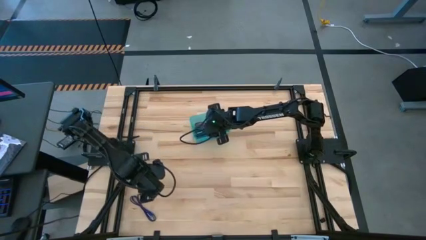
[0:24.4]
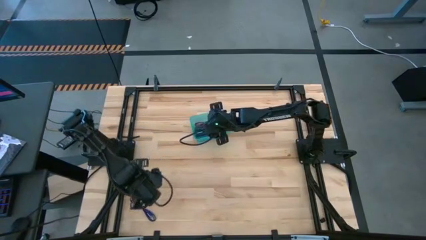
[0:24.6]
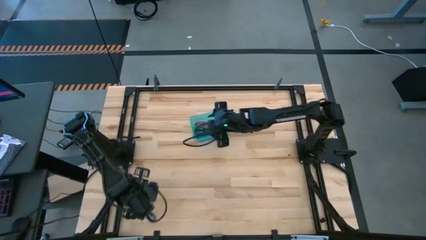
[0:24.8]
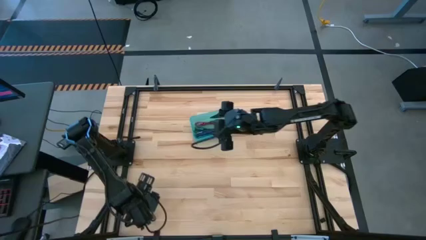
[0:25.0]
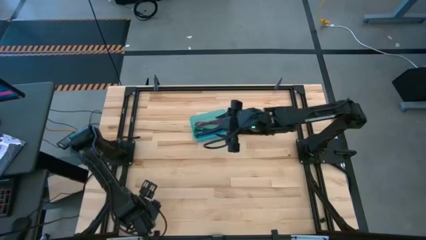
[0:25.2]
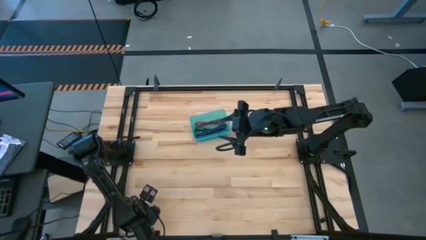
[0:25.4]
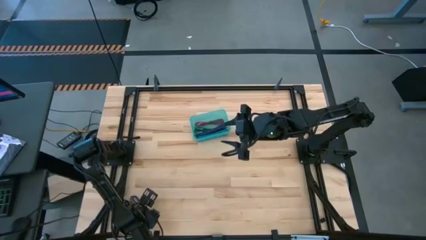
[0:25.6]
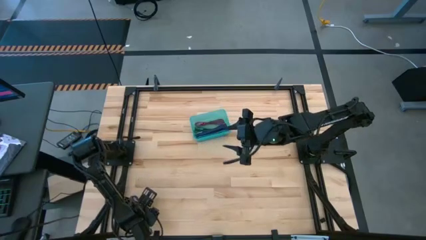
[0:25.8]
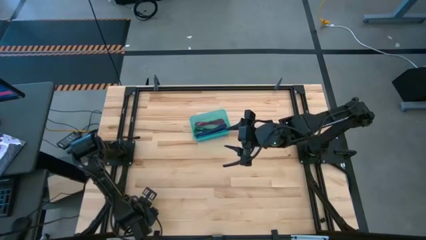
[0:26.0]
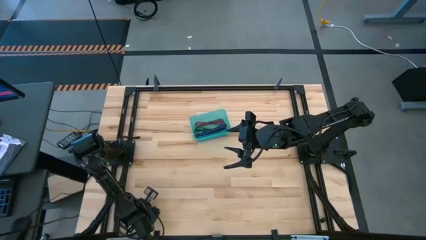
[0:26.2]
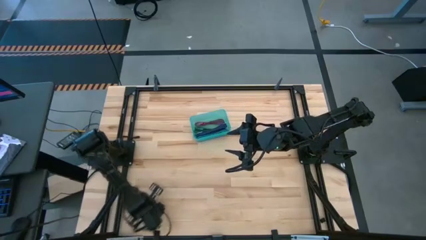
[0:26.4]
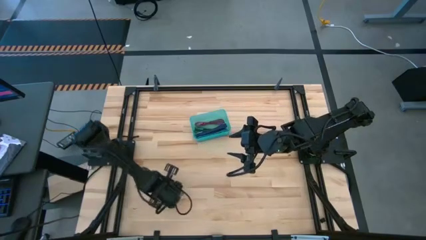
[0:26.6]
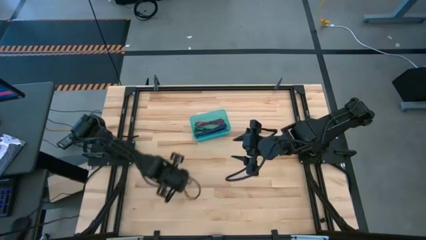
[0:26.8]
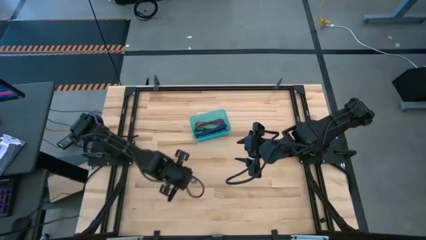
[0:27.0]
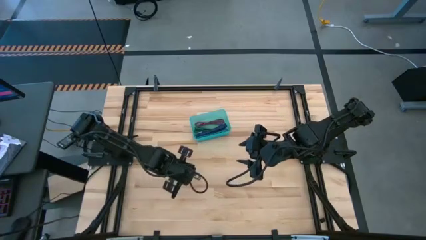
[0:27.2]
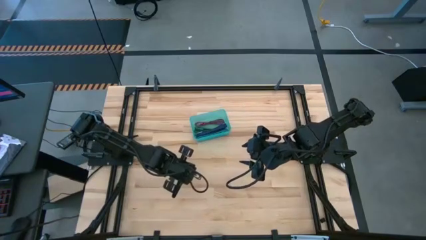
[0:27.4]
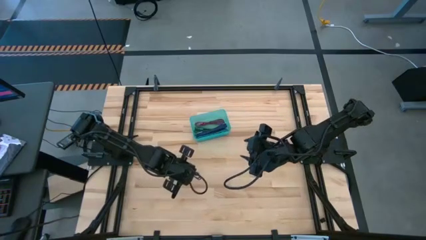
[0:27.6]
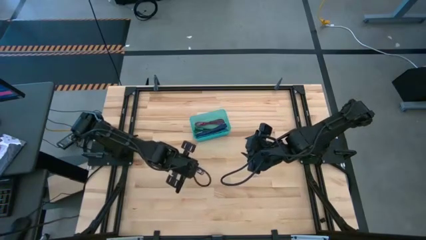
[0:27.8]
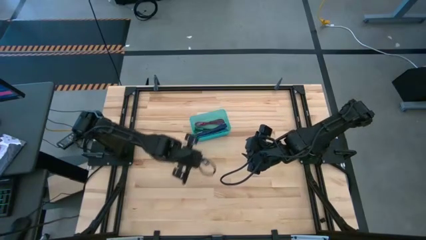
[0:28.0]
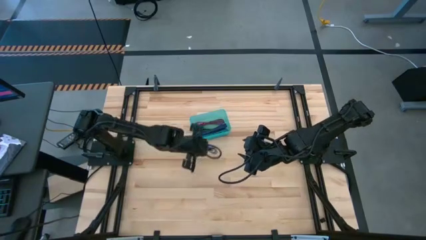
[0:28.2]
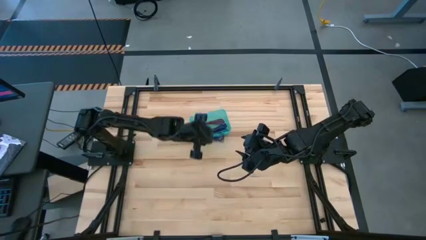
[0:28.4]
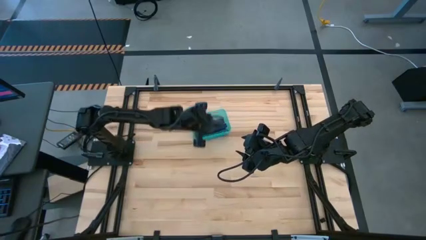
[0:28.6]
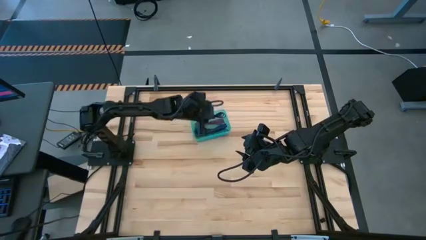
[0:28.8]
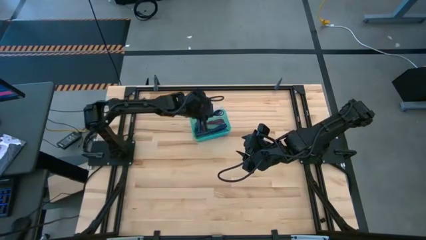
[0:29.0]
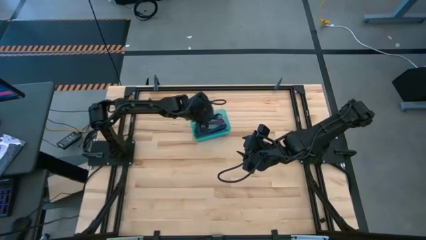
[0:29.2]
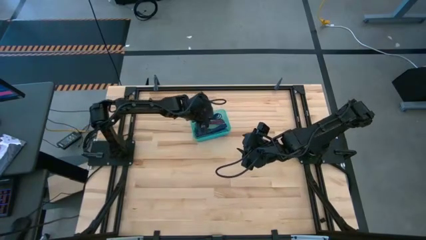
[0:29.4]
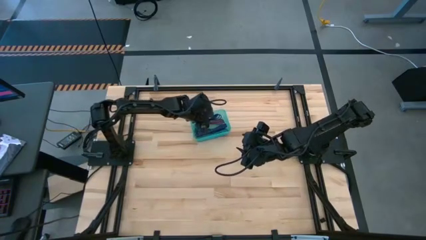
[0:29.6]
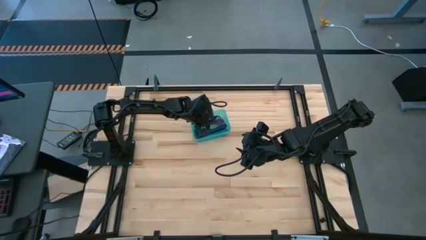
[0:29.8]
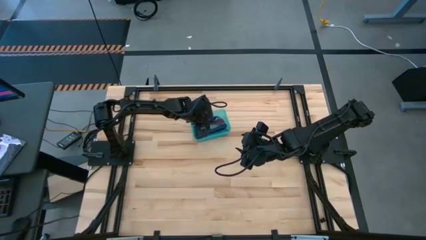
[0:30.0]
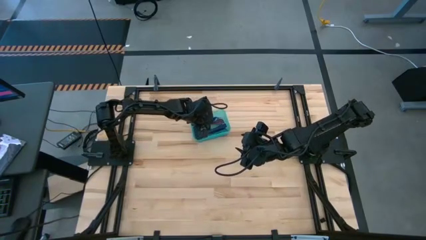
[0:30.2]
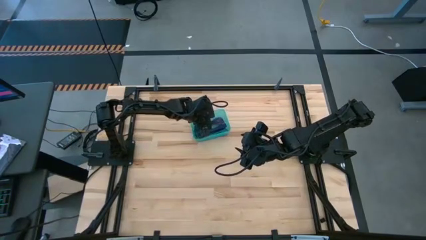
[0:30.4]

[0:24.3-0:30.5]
Task: Pick and place USB-C Cables
Put the purple charger cable into the green bin

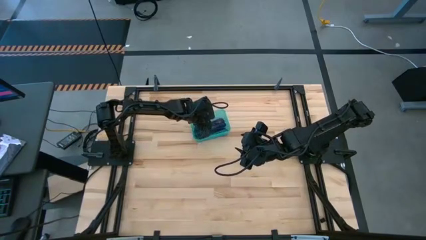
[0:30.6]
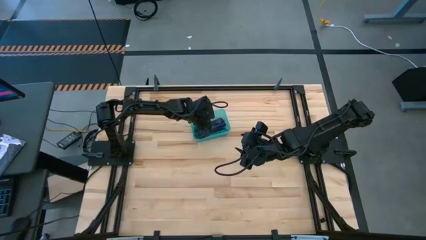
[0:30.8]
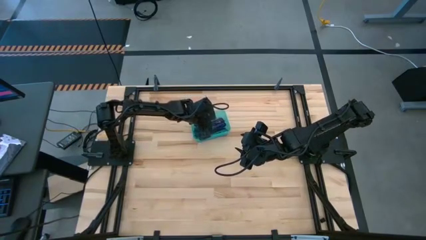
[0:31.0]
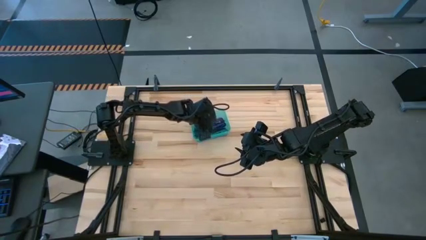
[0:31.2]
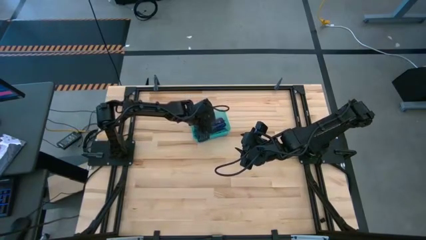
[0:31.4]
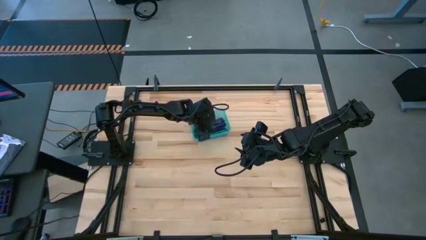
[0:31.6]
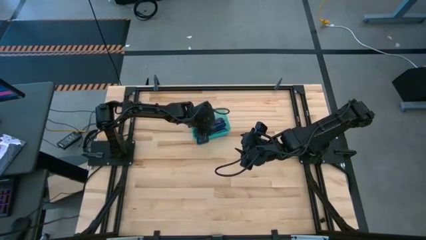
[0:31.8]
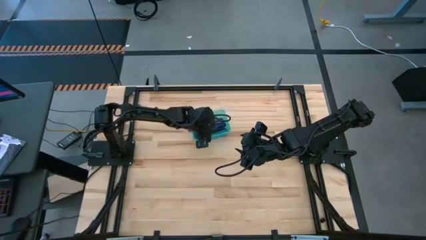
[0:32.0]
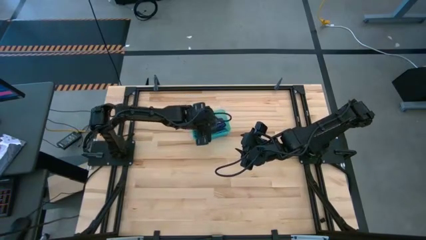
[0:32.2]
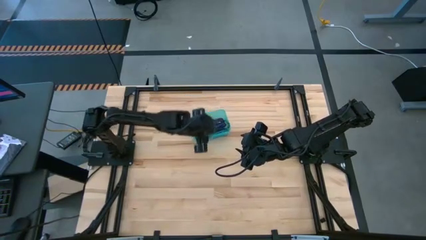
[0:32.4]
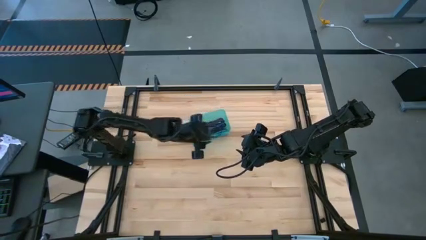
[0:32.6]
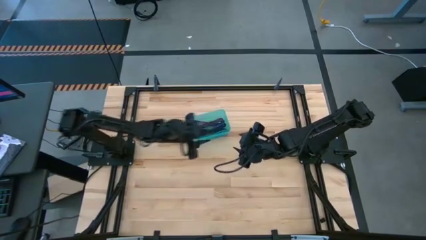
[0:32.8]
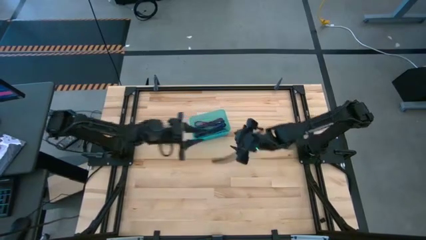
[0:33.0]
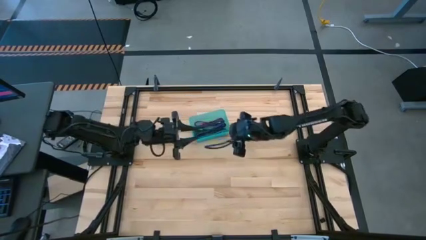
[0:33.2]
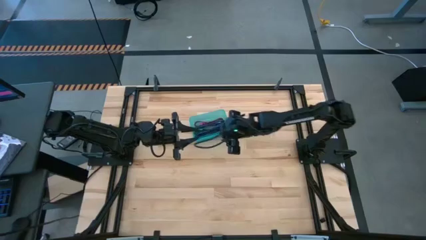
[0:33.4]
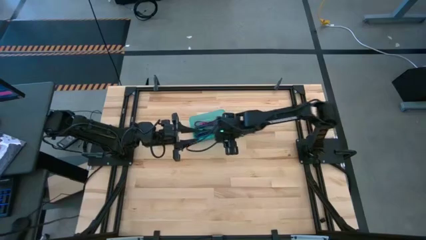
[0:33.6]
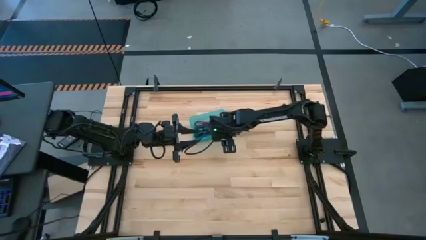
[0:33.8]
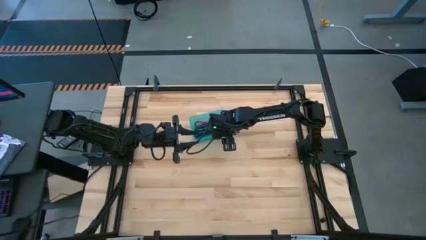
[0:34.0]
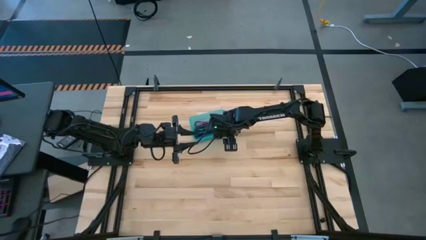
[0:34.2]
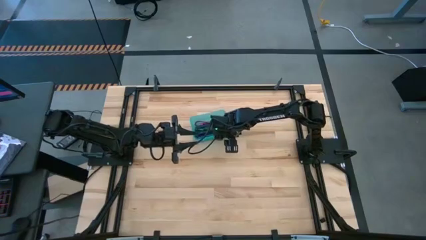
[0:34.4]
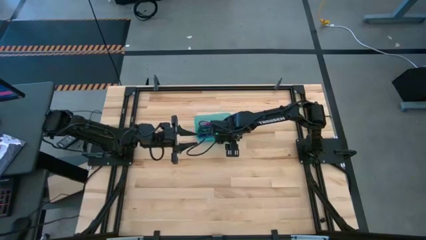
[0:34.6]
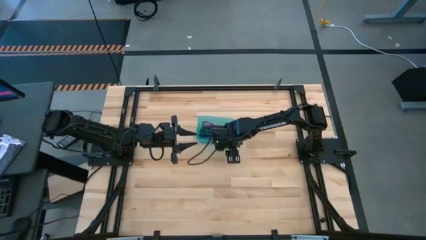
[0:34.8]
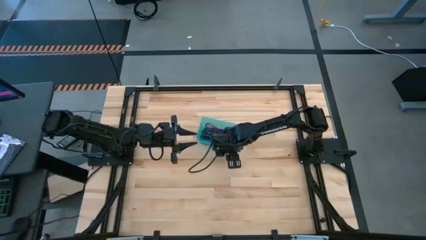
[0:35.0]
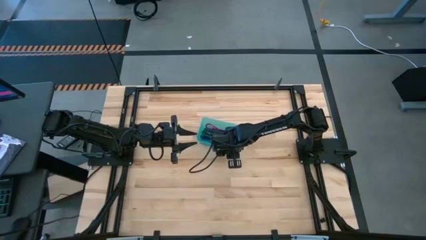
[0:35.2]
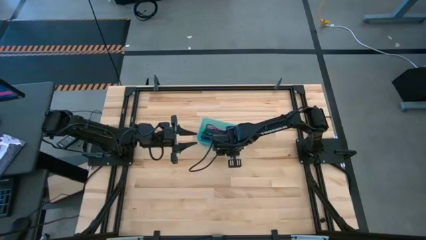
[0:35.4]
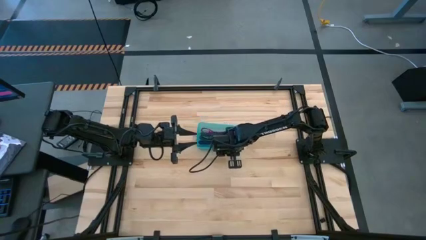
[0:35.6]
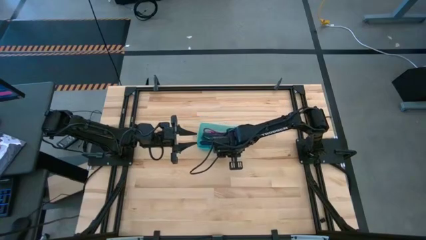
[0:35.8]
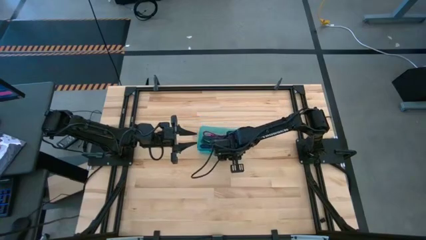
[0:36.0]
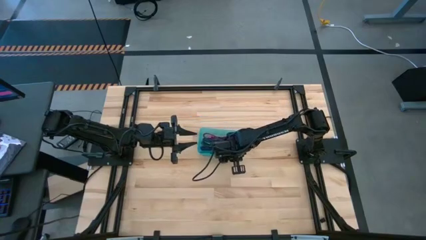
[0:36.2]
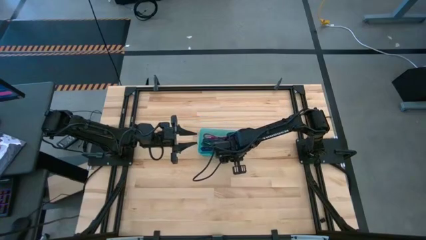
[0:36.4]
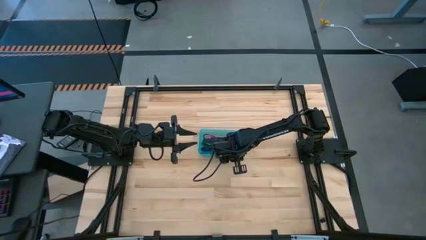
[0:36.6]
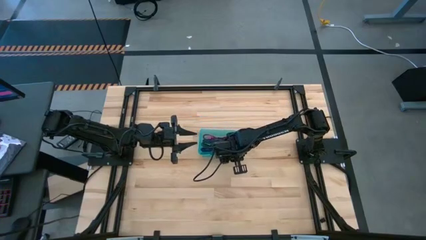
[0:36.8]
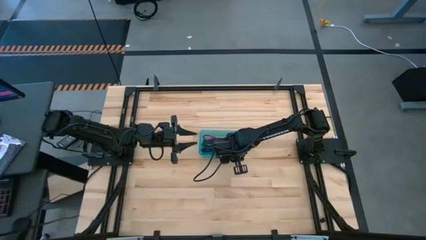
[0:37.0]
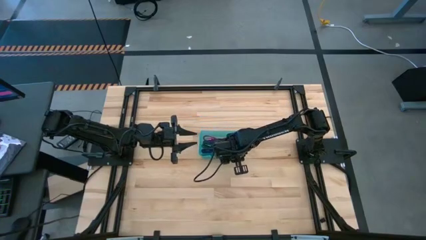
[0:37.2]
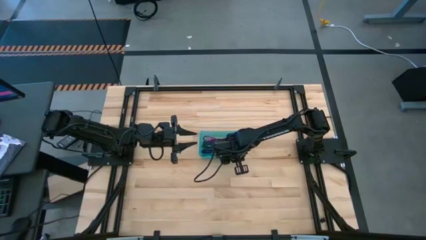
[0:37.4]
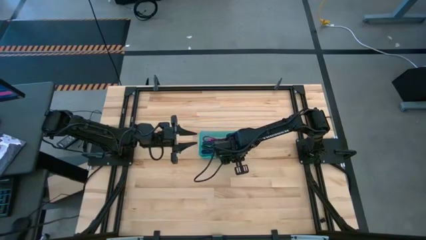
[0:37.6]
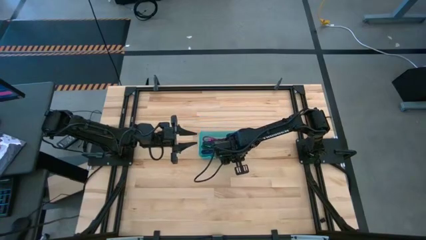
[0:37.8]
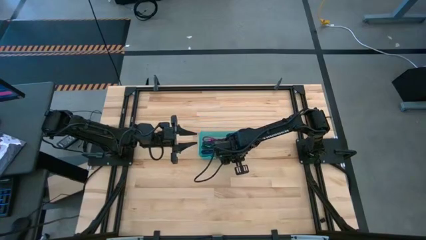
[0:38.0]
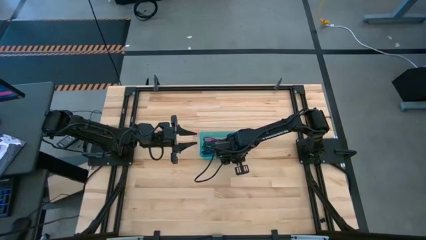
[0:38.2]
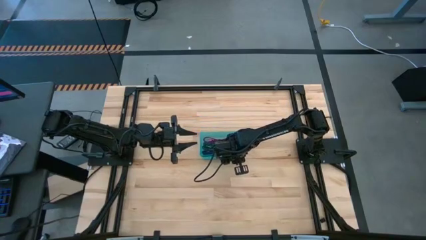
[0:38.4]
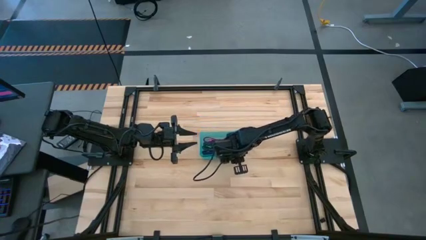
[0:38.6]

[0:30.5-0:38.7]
Adjust the green bin to the middle of the table

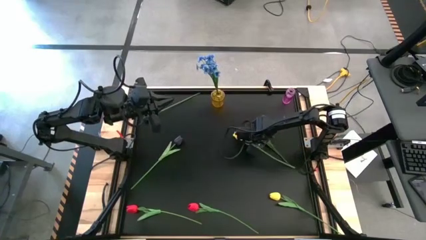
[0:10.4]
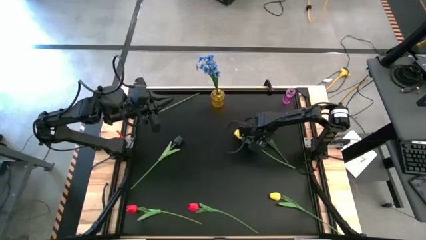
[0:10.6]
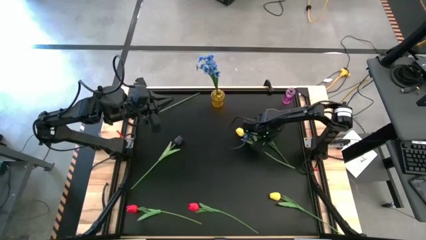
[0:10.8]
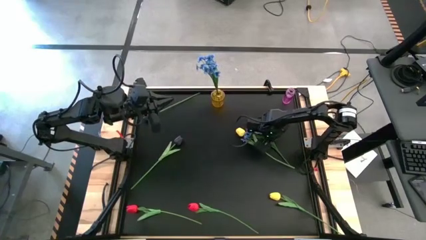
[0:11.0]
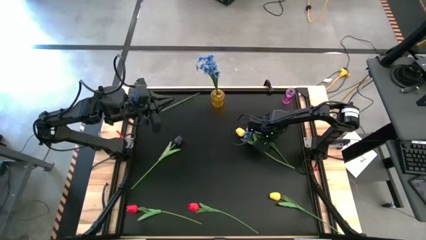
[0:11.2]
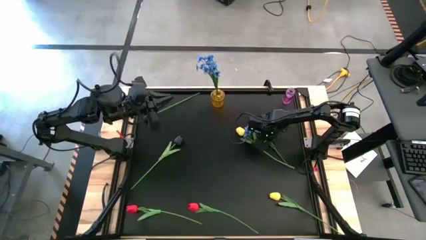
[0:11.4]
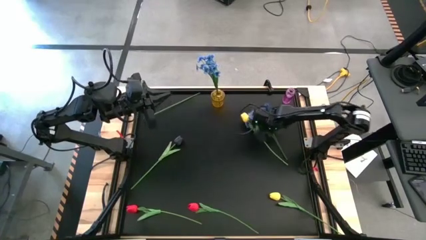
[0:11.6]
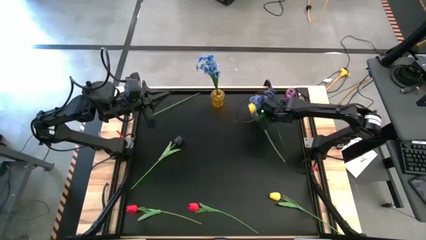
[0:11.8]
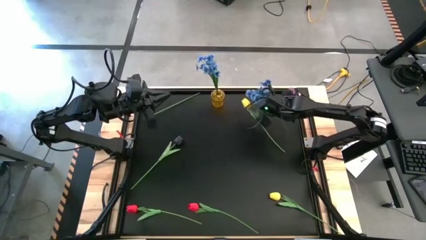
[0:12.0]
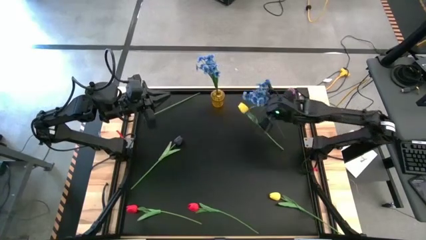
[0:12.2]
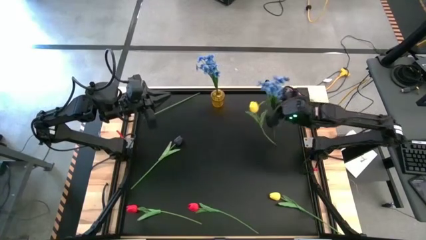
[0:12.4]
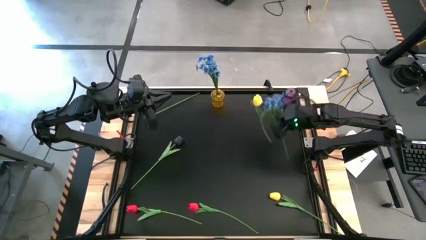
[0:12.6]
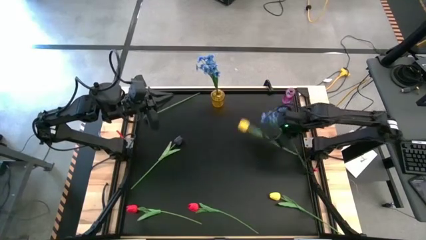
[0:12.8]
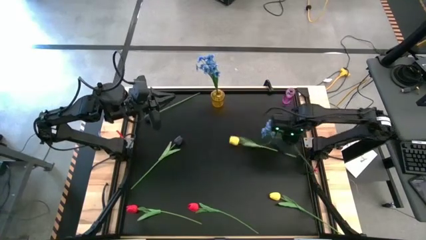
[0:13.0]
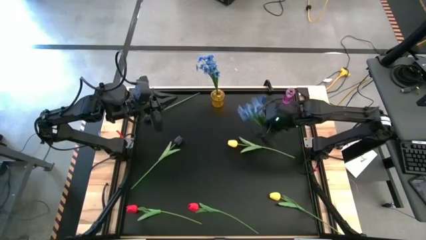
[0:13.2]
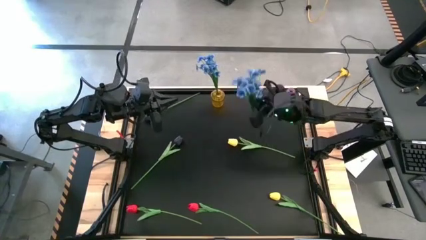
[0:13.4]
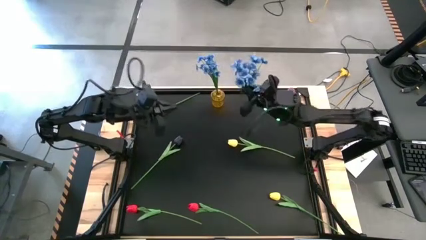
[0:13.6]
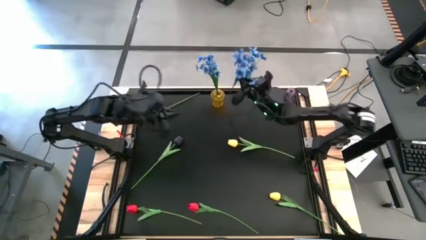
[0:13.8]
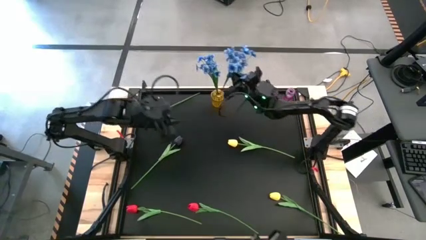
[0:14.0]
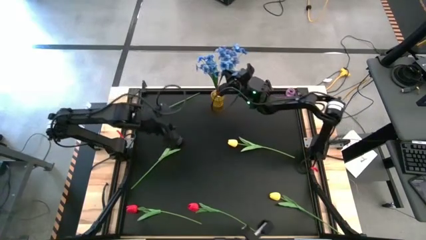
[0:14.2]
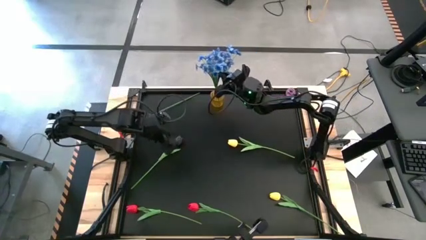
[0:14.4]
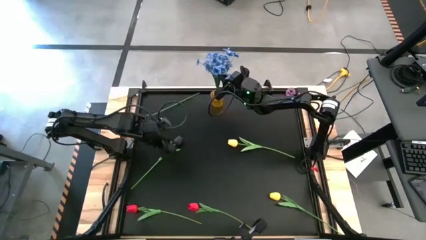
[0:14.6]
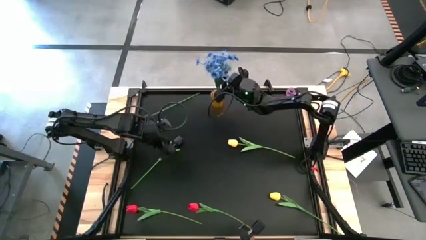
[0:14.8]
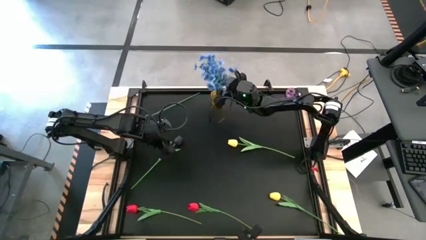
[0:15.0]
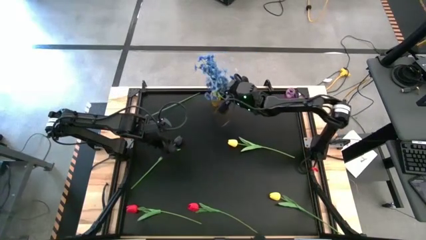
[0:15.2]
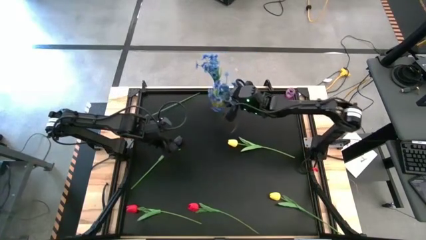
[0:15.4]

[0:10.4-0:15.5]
Task: Sort flowers into vase by color
Put the blue flowers into the yellow vase
